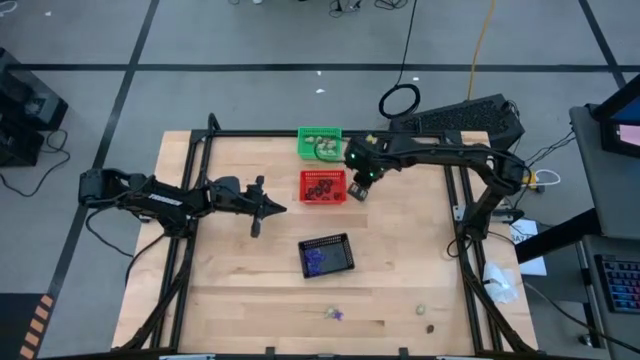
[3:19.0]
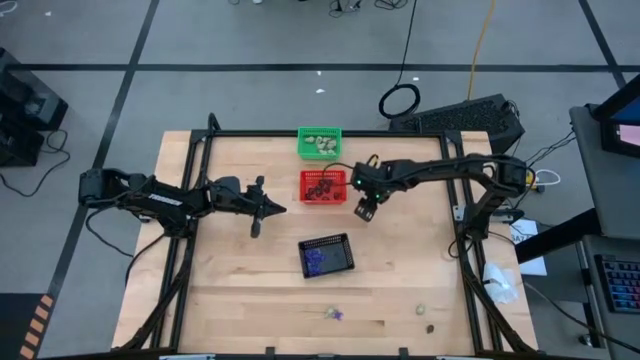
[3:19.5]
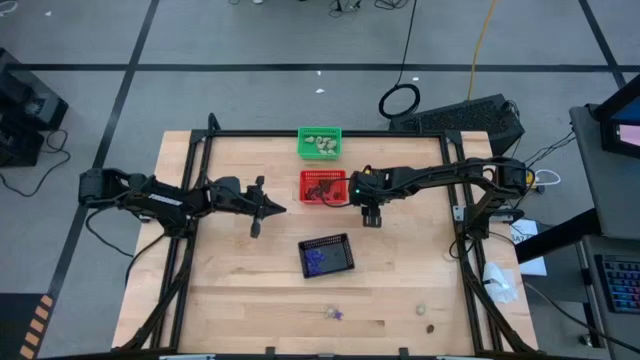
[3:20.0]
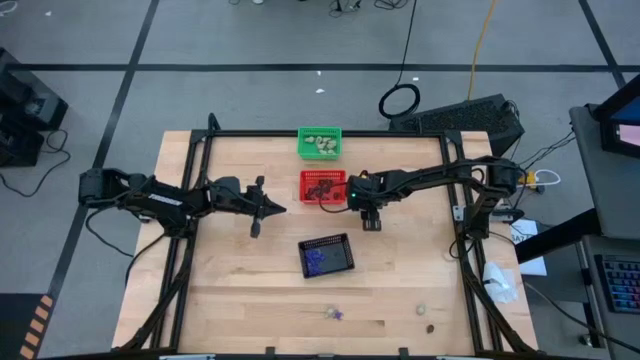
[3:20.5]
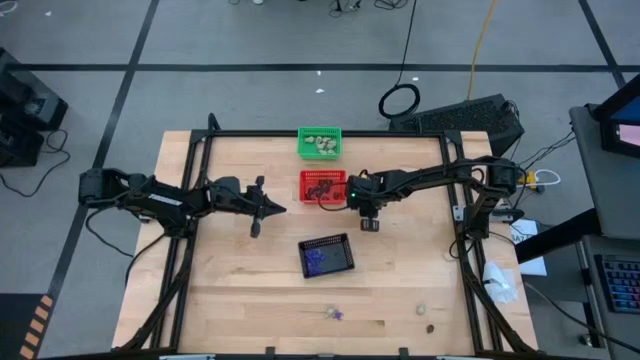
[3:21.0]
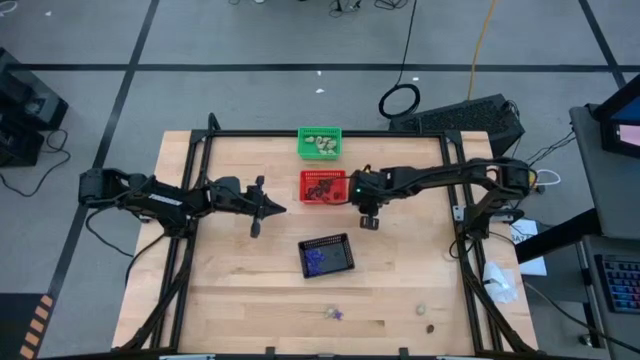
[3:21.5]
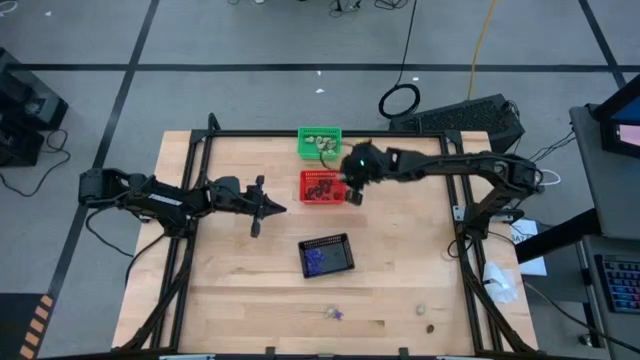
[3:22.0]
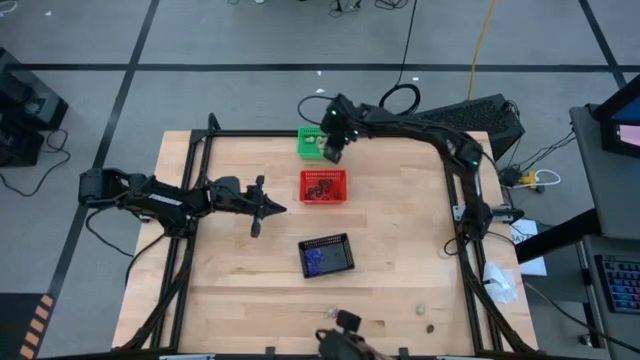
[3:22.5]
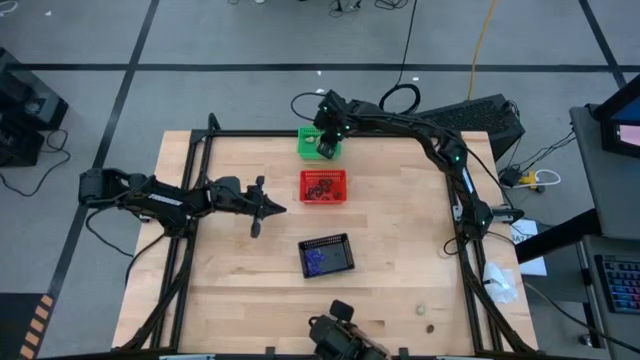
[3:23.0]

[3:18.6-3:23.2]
Task: Sort Halloween decoration
Put the white skull toy into the green basket

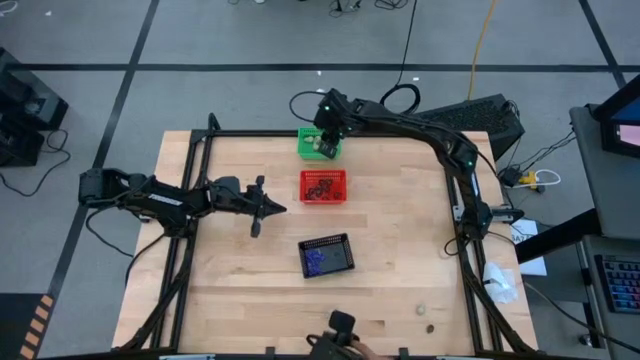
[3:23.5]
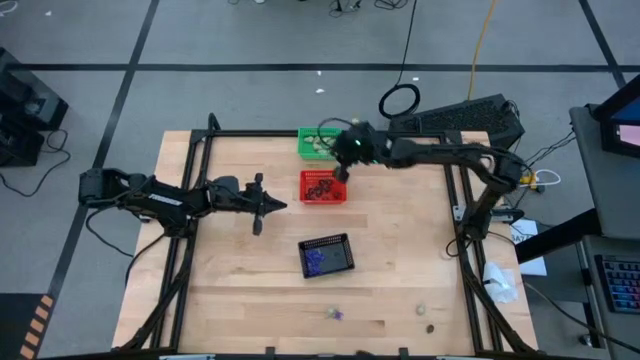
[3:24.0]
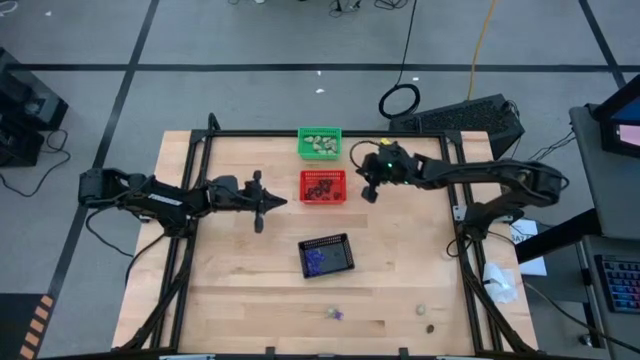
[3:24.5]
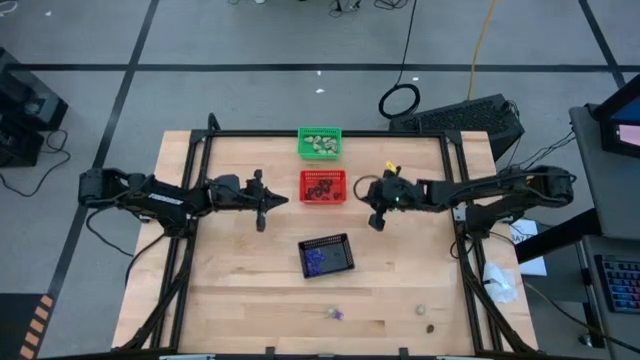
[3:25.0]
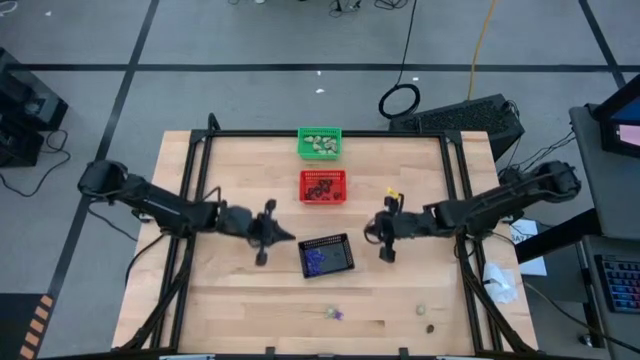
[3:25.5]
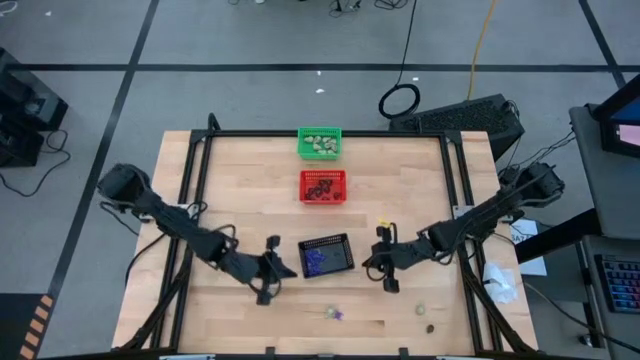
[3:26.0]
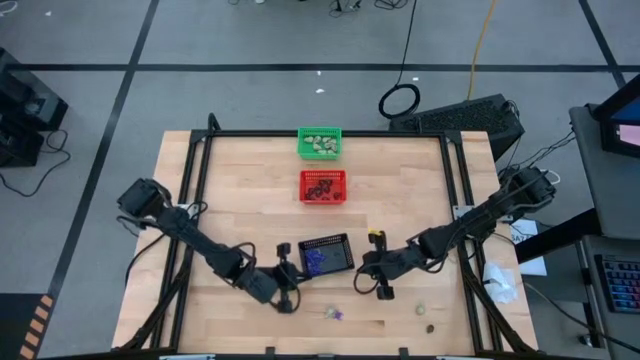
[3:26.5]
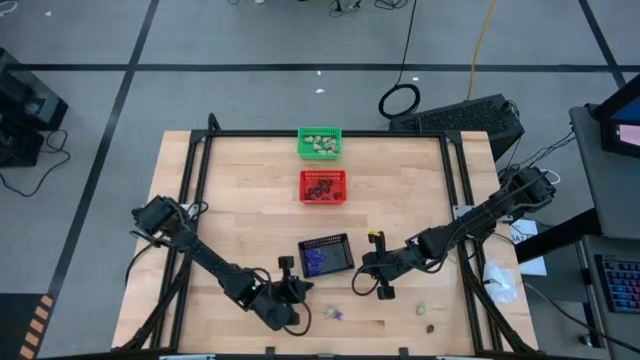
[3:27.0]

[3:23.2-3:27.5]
Put the violet spider toy into the black basket

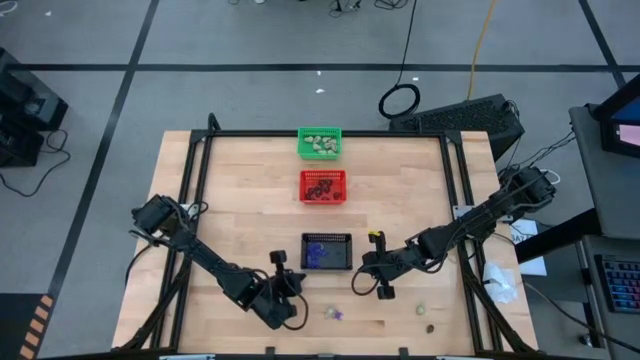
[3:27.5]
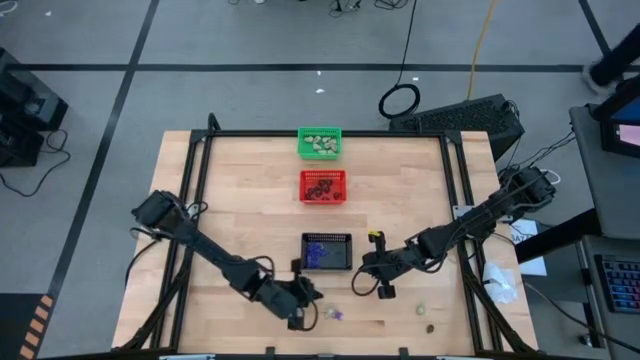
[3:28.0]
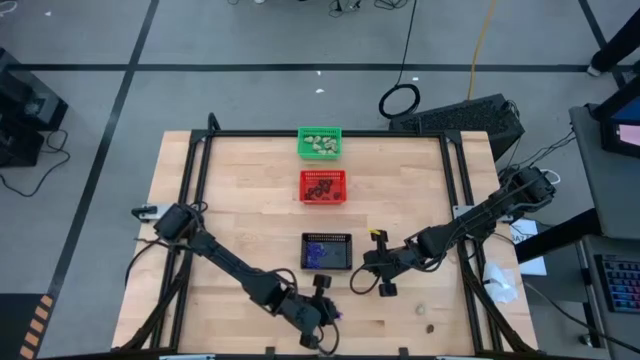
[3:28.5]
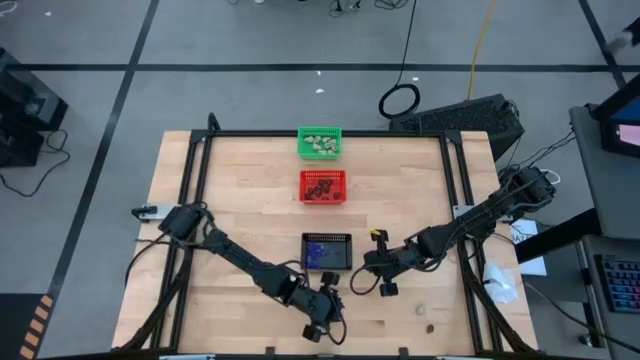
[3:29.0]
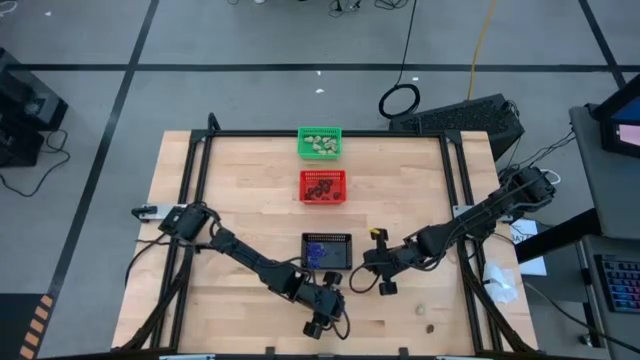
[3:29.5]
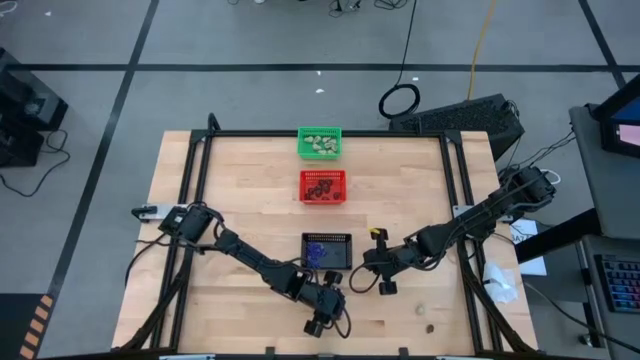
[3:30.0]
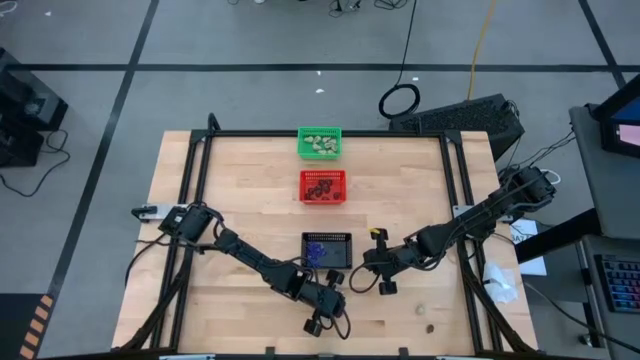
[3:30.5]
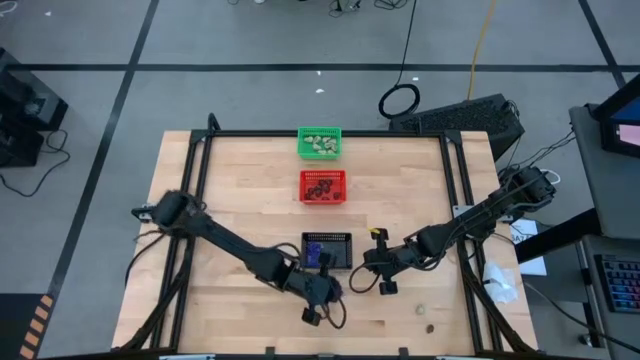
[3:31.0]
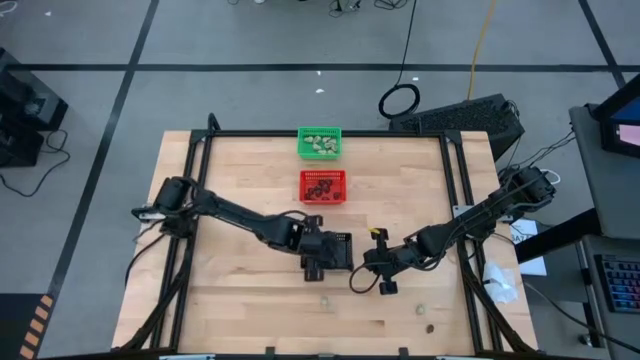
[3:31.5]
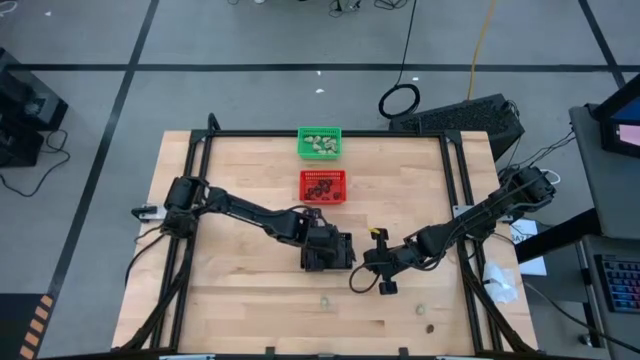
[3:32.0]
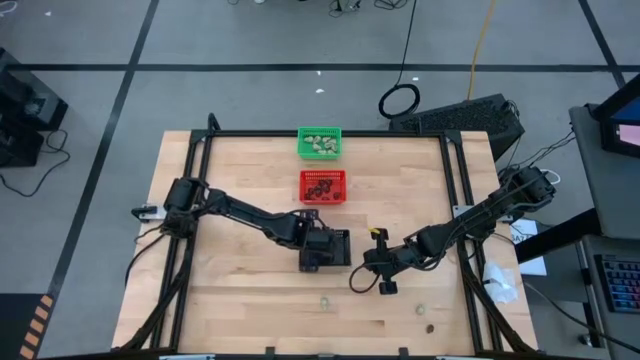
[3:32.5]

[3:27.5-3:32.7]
Adjust the black basket

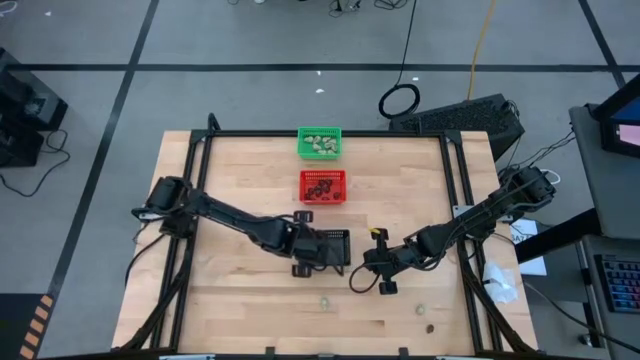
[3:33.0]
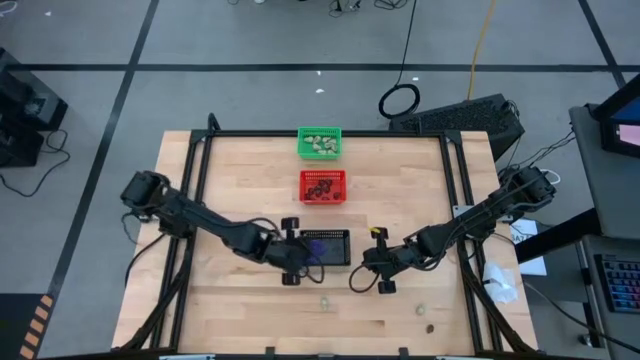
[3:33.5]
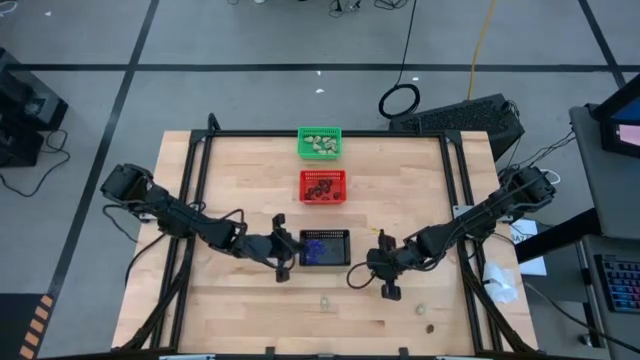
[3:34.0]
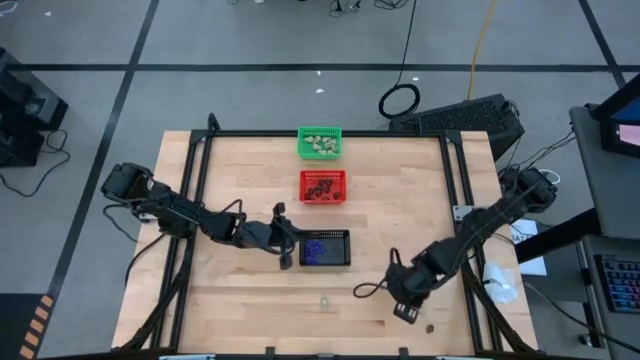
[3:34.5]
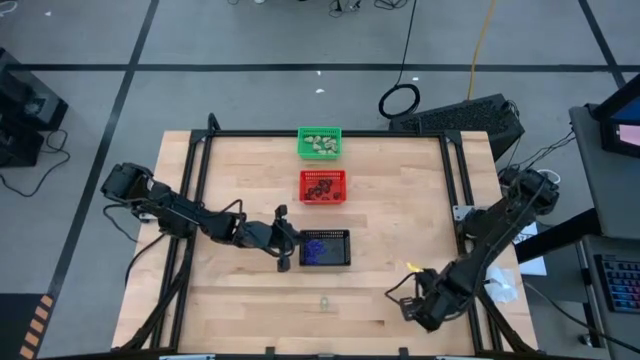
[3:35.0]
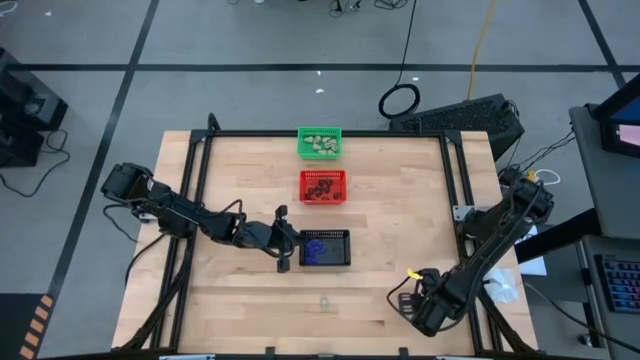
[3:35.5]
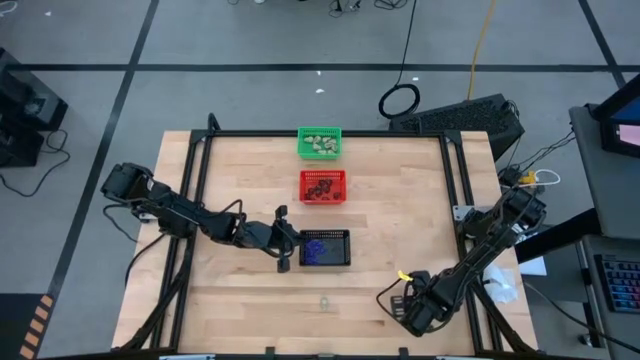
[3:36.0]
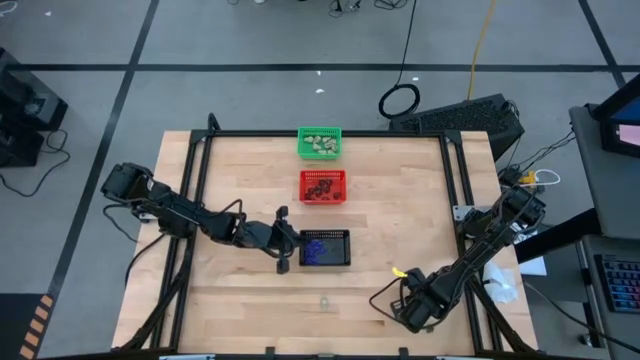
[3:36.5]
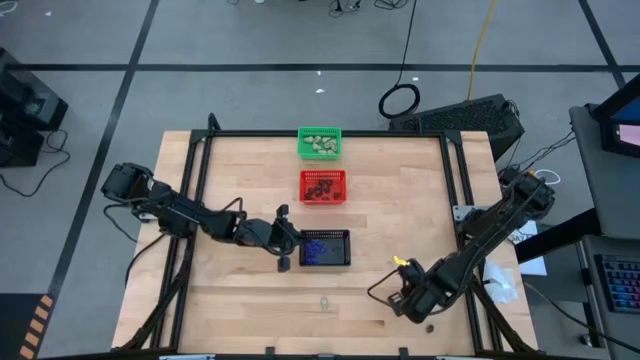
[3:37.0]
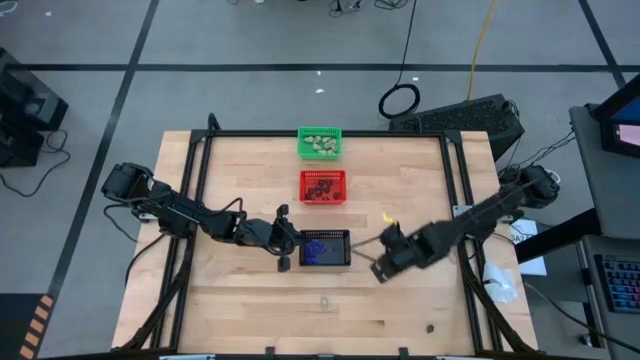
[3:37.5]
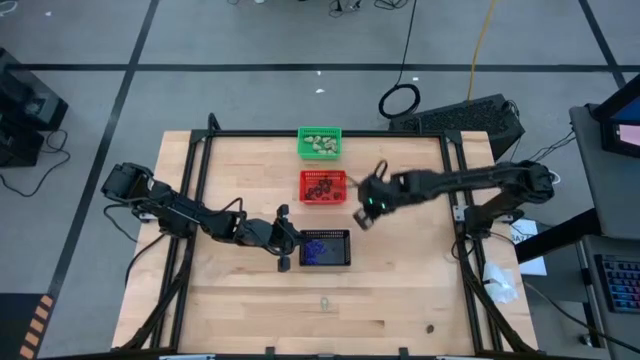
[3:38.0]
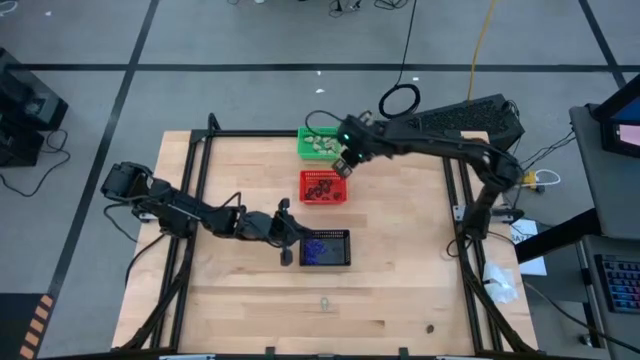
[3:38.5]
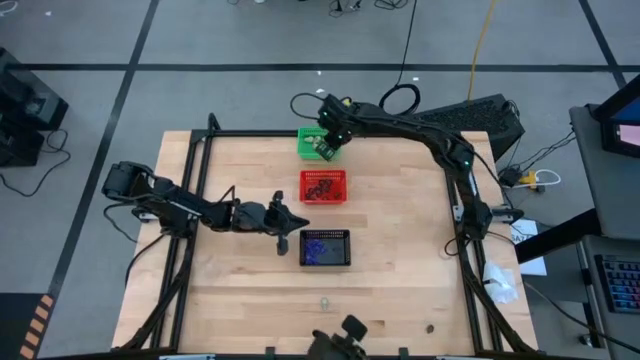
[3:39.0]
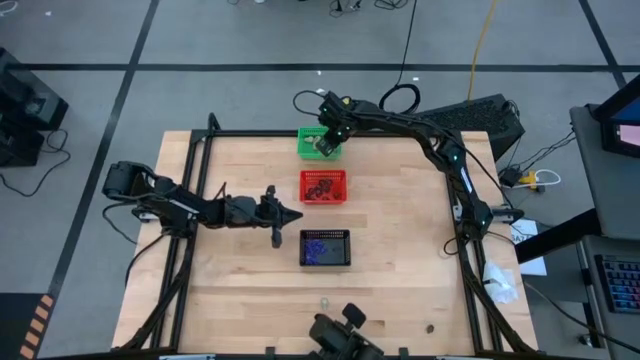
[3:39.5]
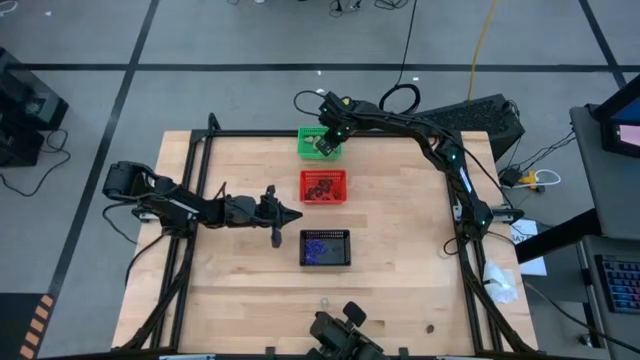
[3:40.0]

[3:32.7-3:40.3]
Put the white skull toy into the green basket
